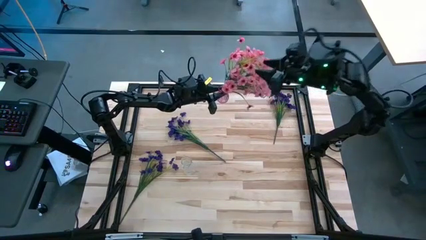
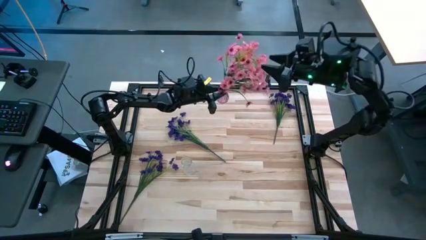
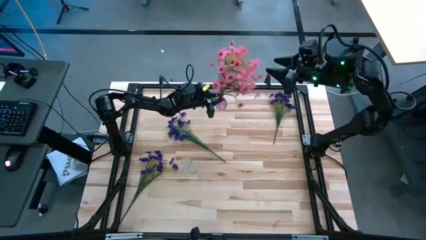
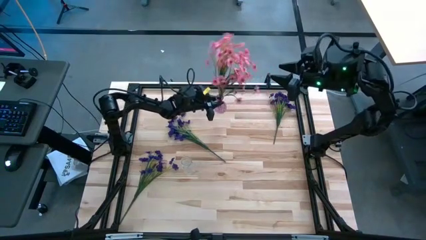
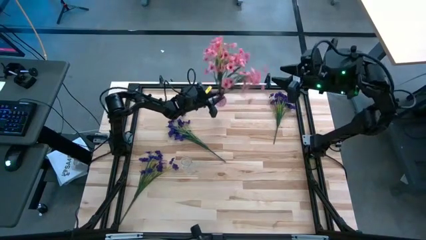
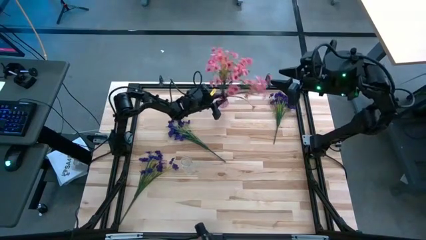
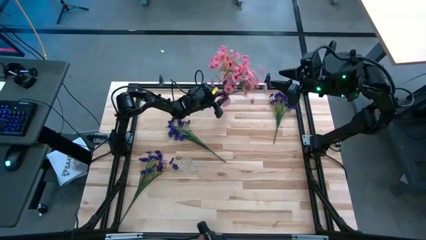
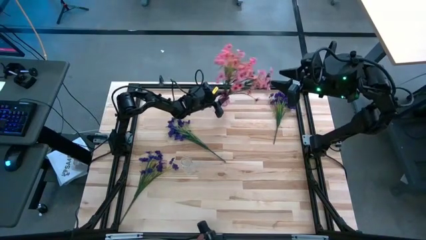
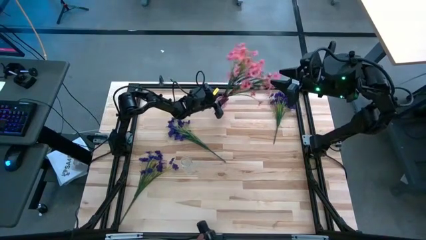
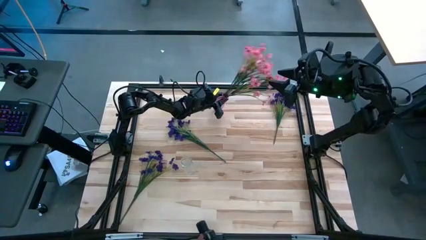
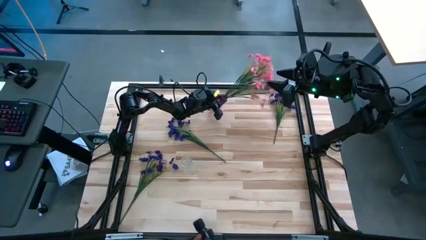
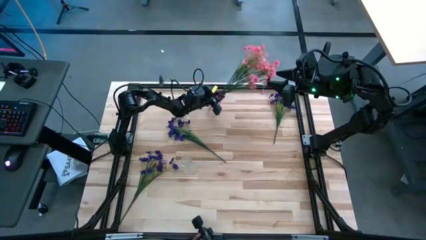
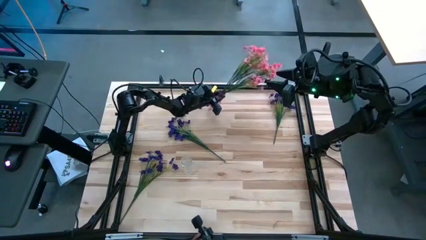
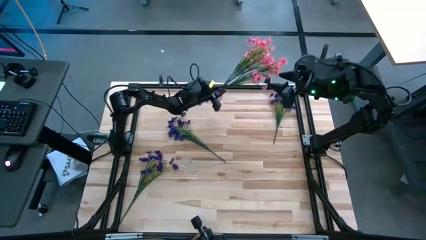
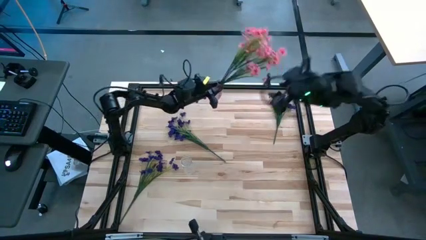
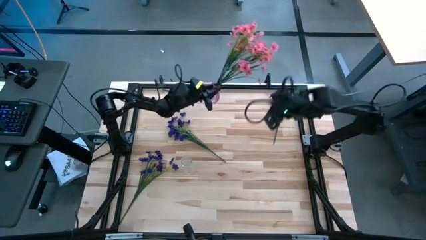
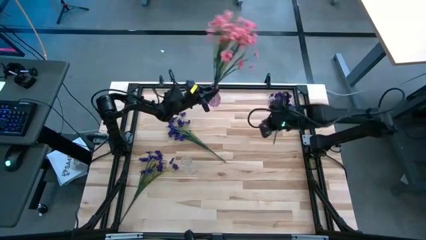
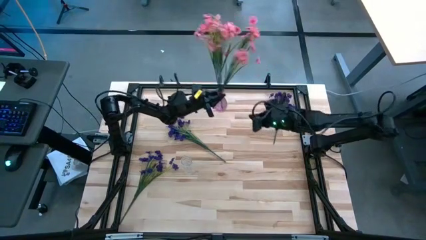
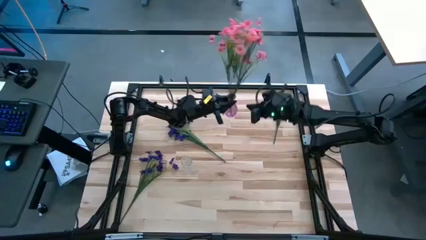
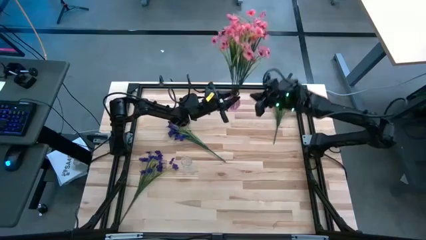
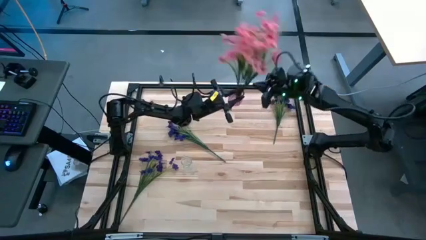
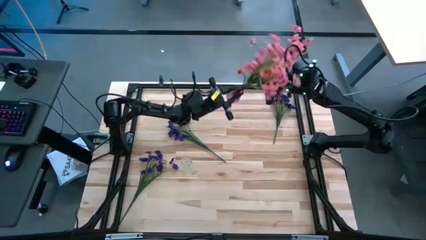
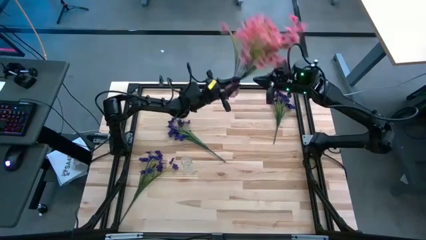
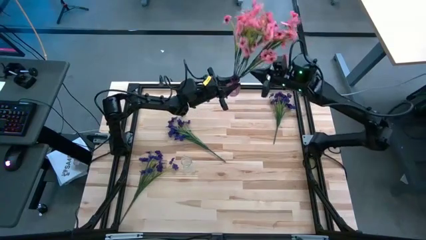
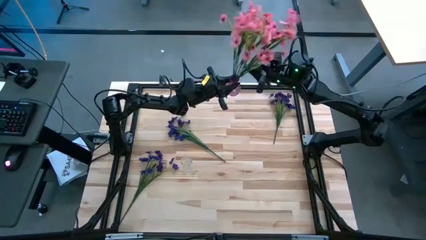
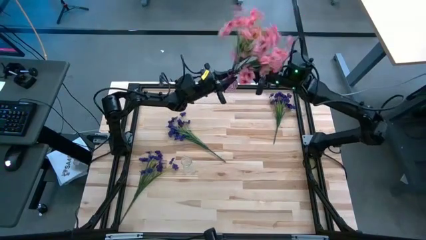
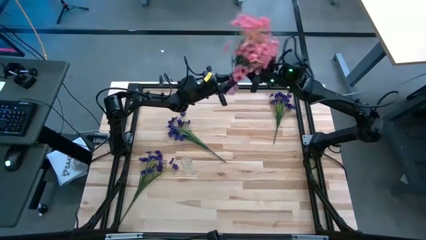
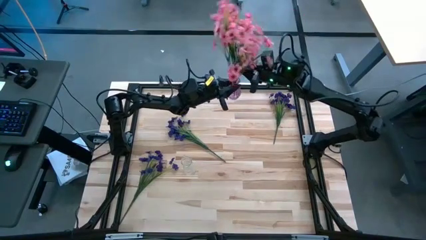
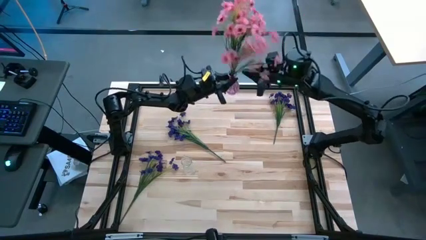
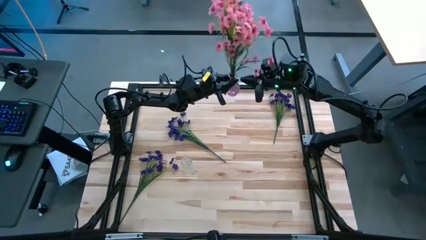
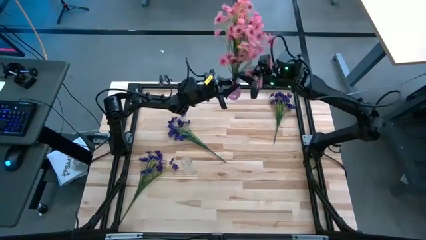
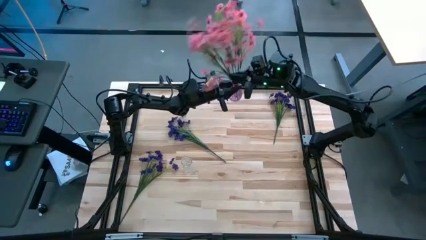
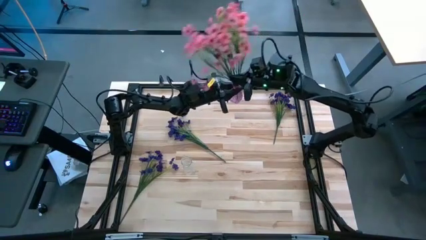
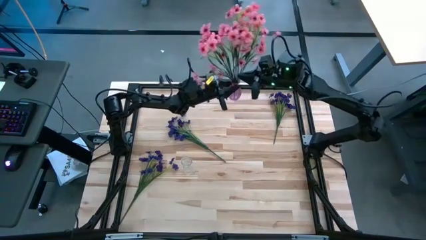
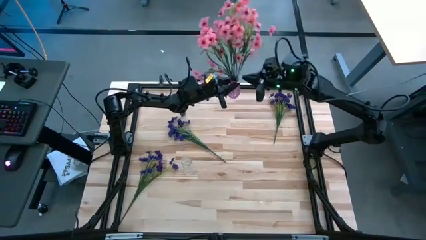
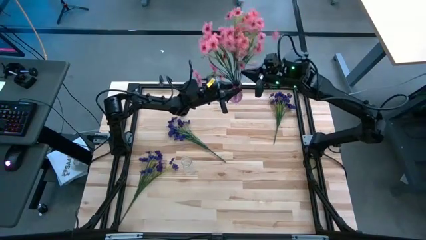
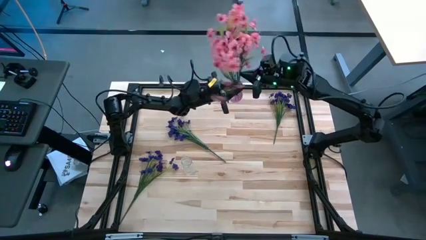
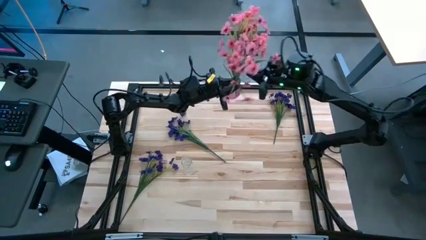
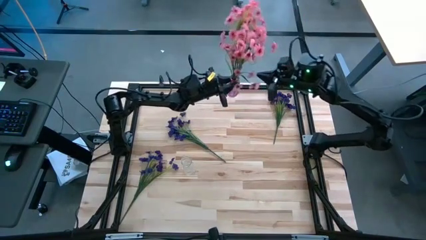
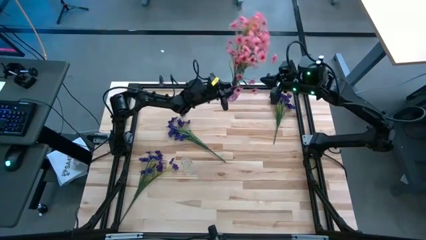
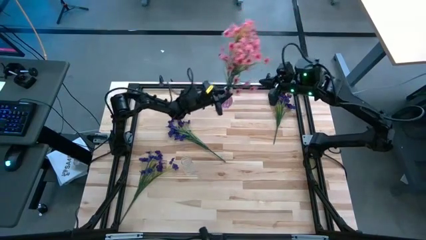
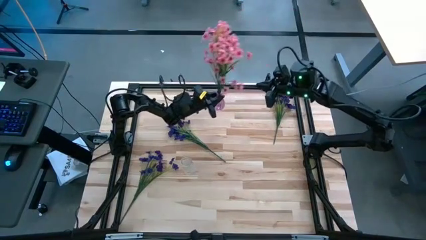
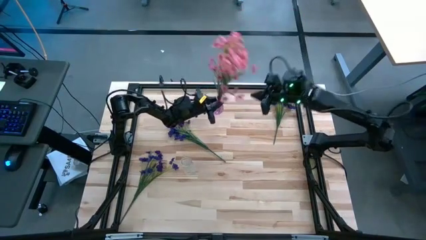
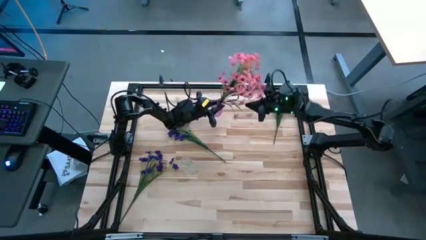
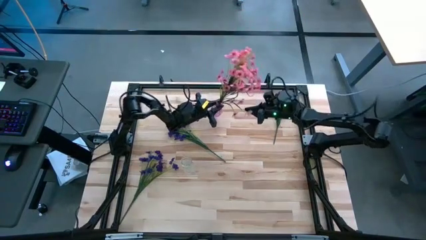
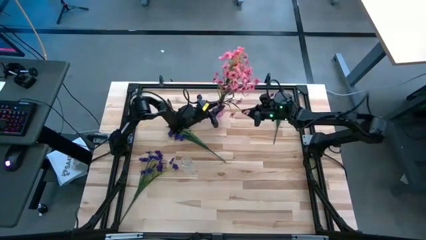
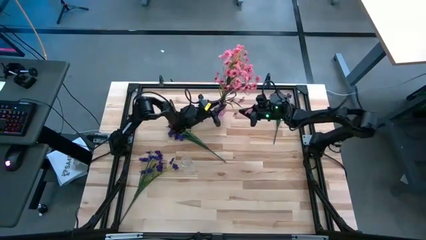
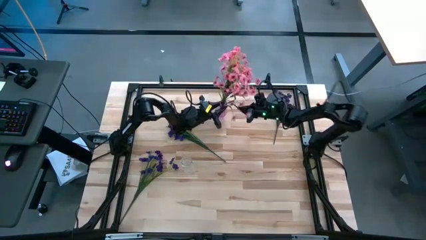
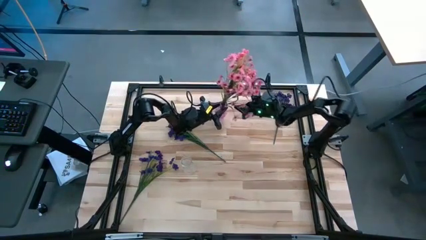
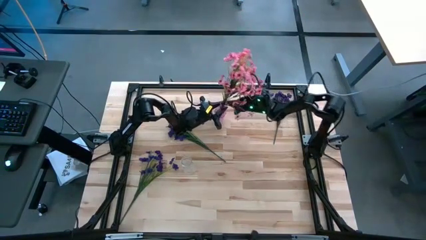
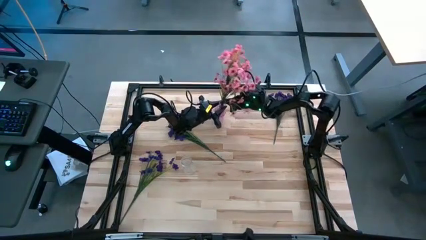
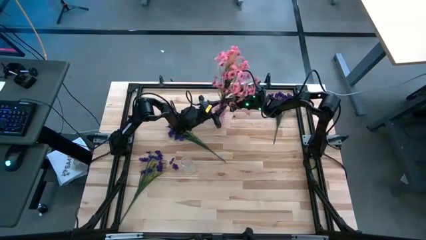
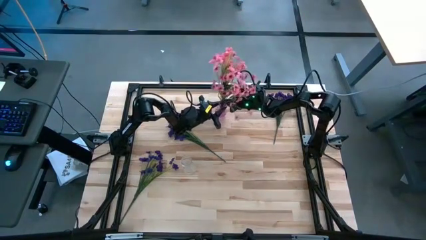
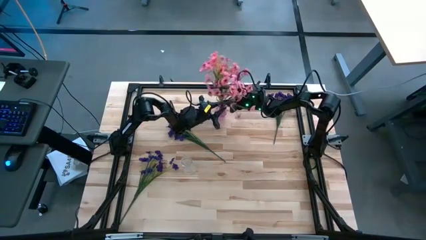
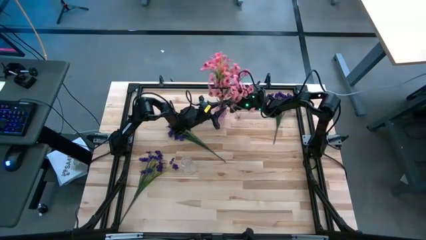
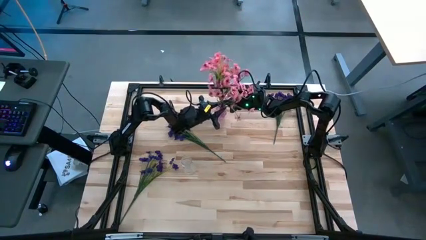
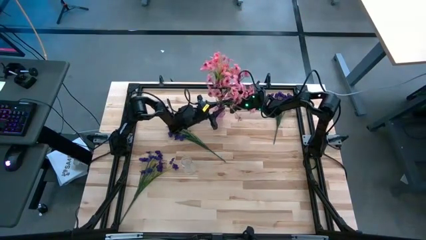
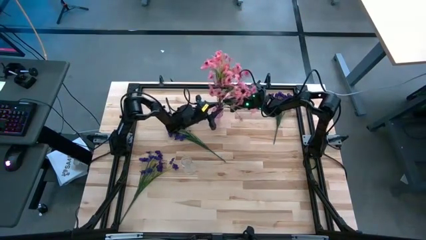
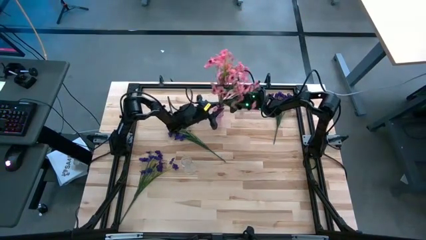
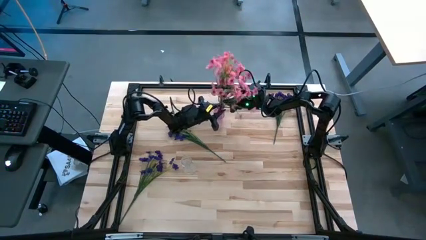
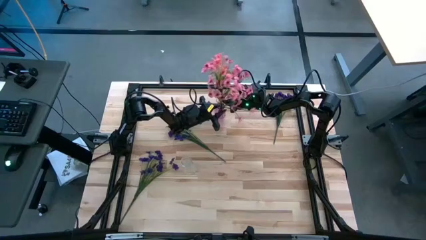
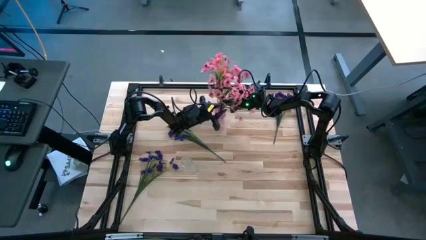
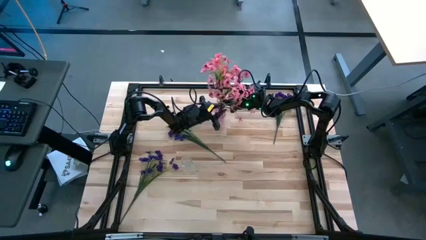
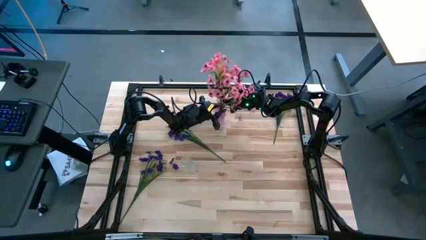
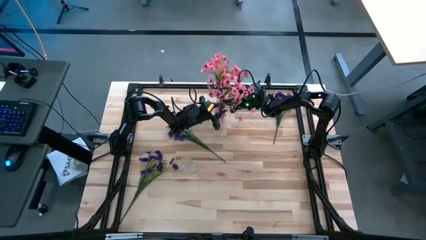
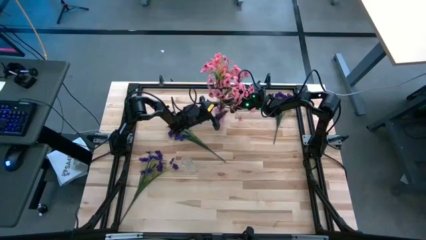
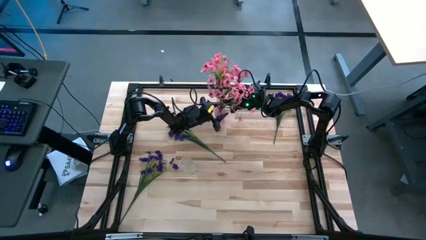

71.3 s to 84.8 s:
Task: Sort flowers into vase by color
Adjust the pink flowers on the purple vase

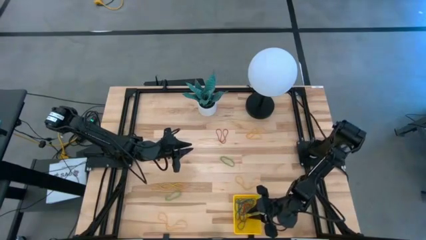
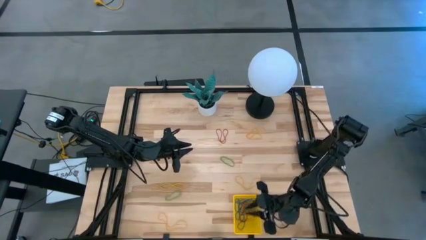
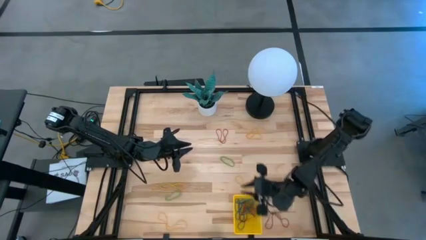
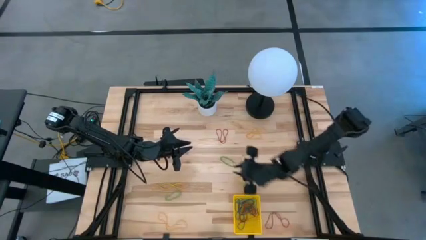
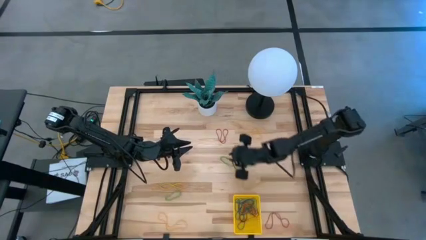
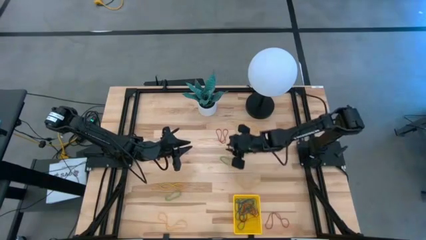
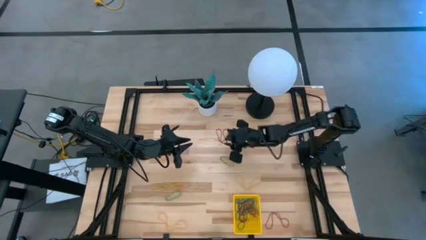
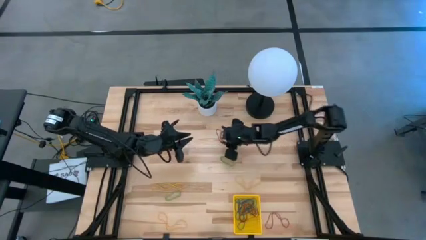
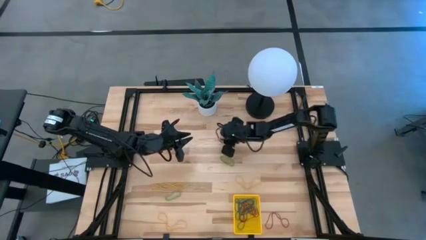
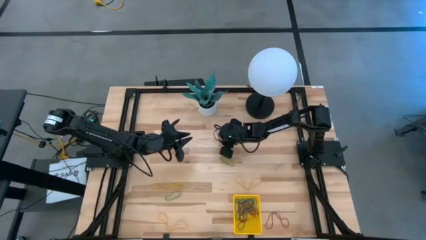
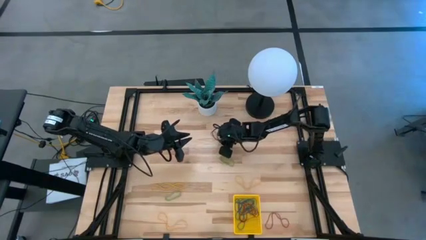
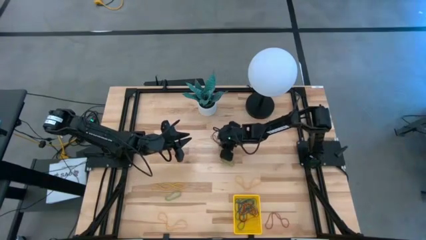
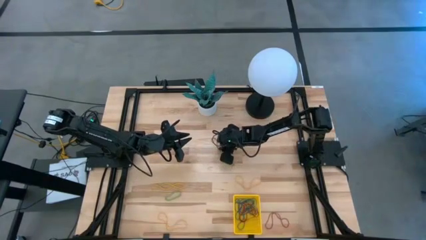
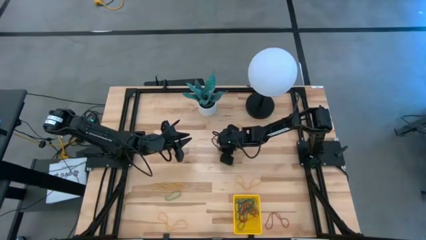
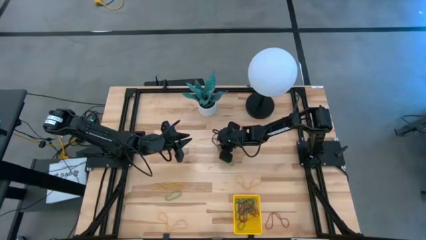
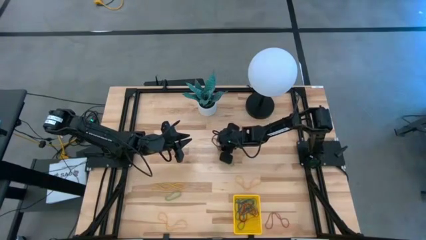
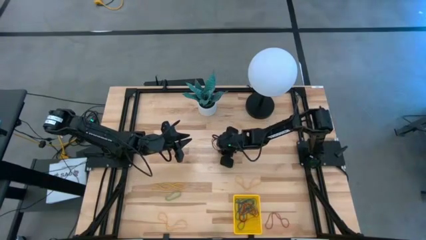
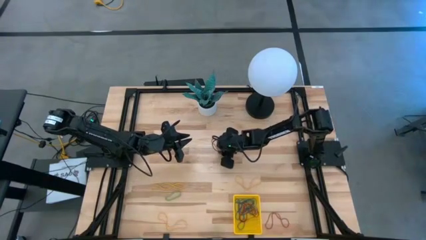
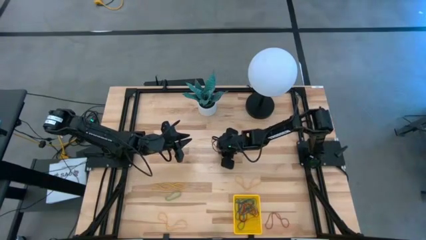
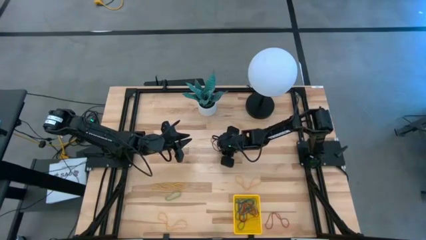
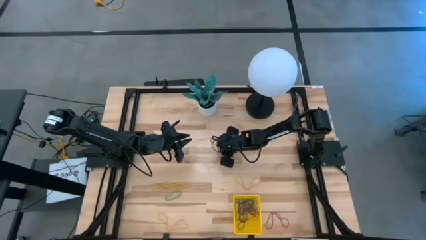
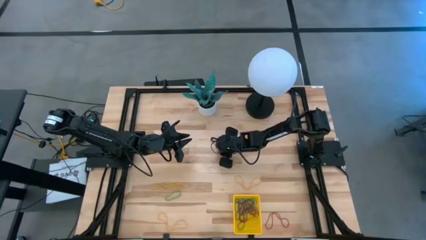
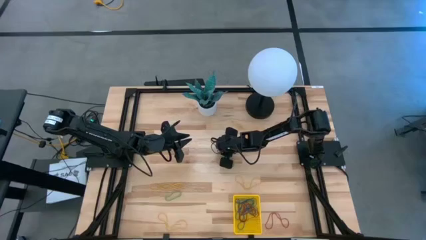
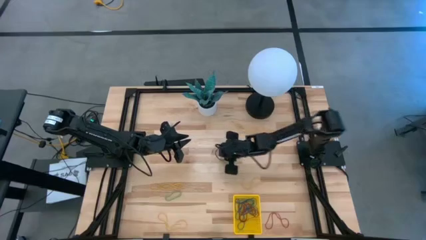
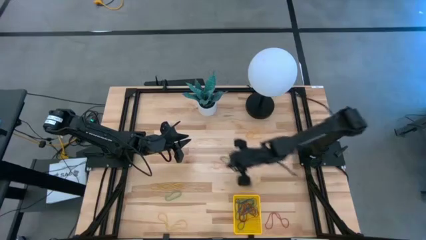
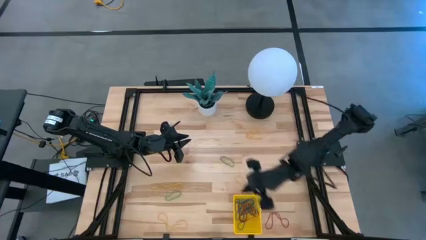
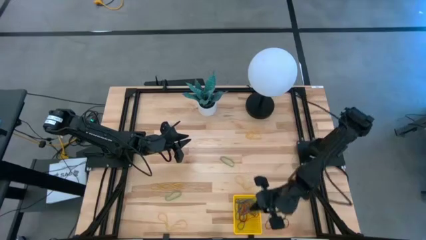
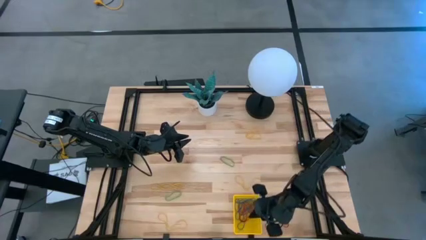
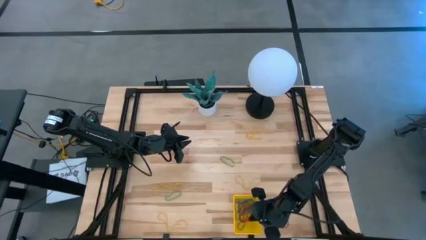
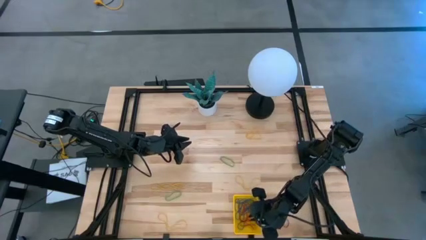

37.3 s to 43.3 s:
Task: Pick and place rubber bands into bin
Put the red rubber band into the yellow basket
